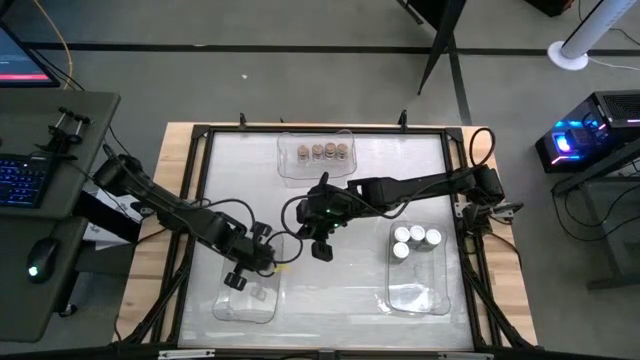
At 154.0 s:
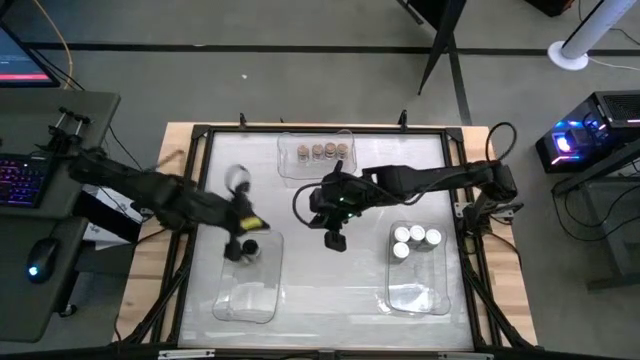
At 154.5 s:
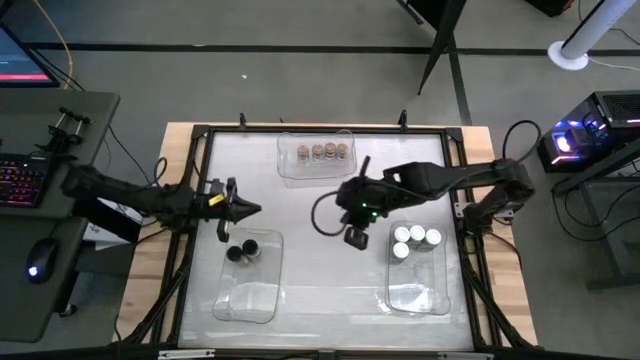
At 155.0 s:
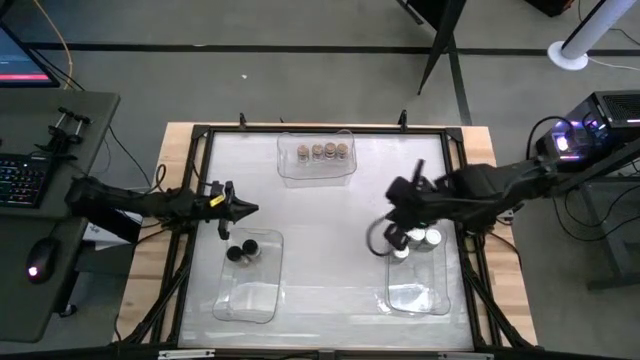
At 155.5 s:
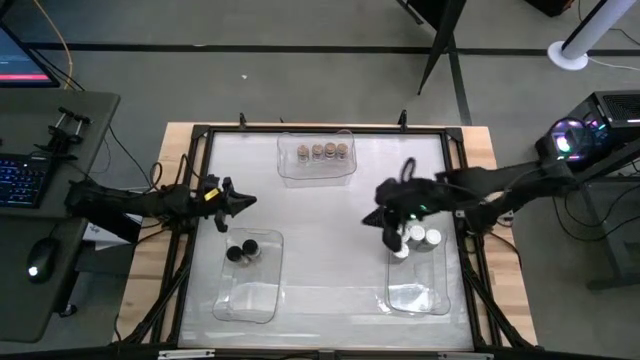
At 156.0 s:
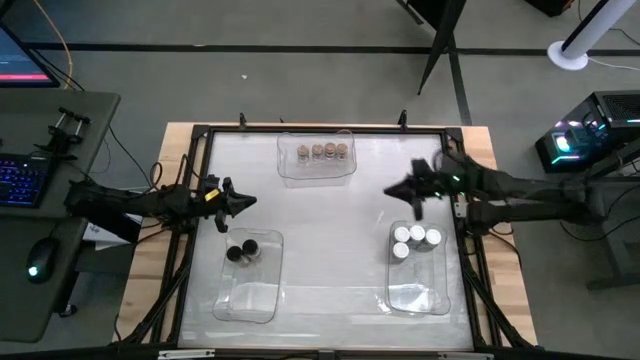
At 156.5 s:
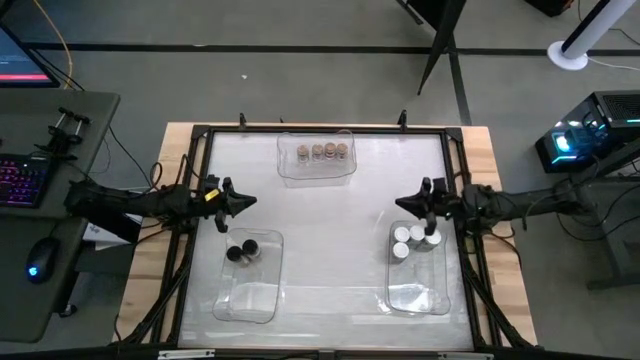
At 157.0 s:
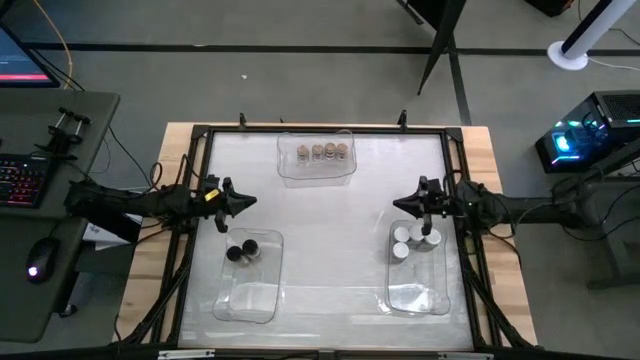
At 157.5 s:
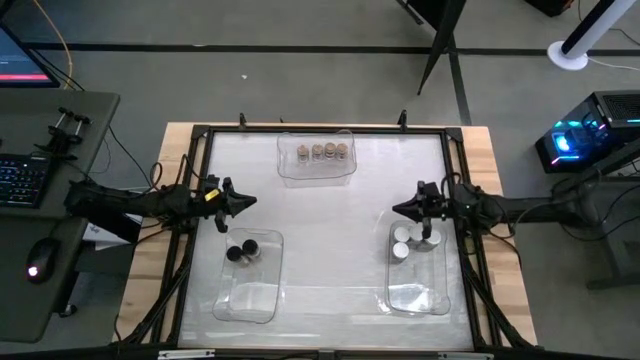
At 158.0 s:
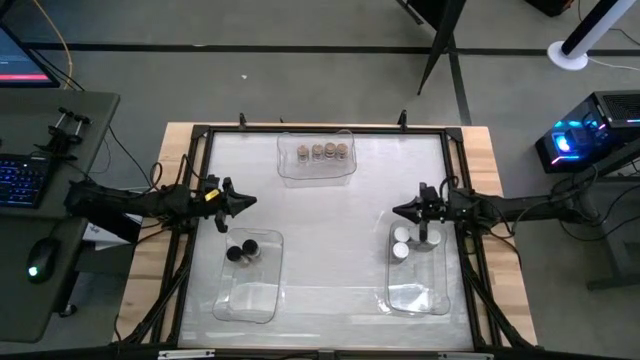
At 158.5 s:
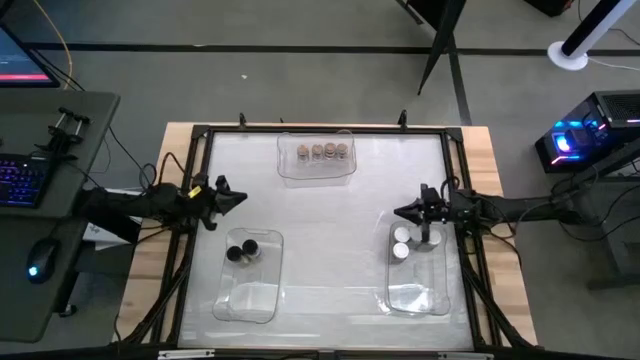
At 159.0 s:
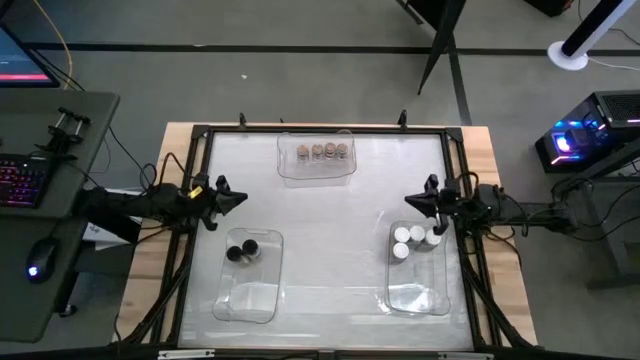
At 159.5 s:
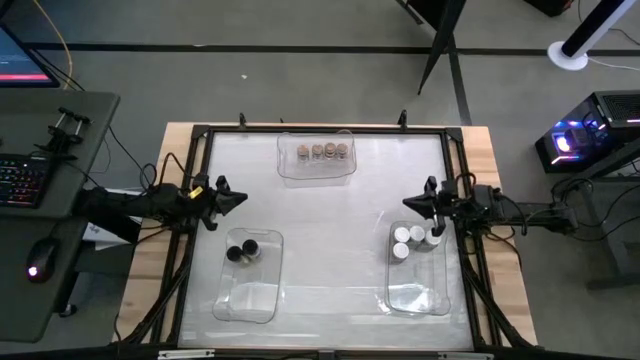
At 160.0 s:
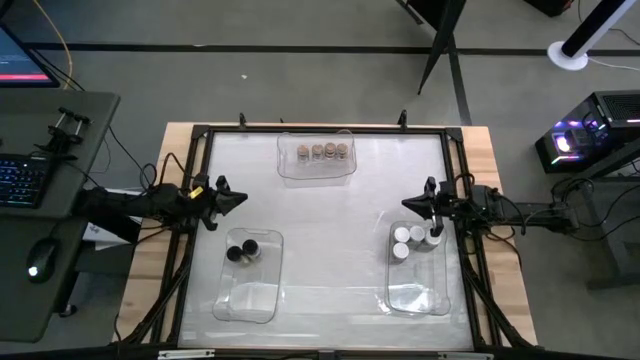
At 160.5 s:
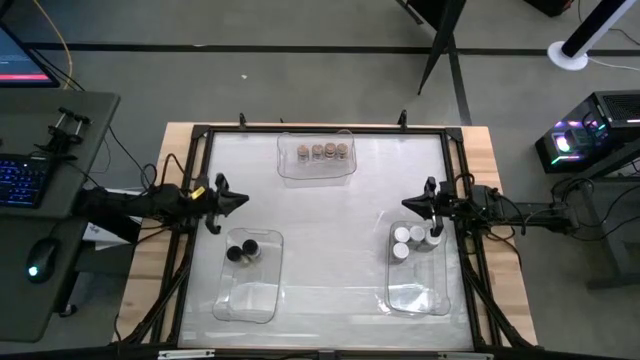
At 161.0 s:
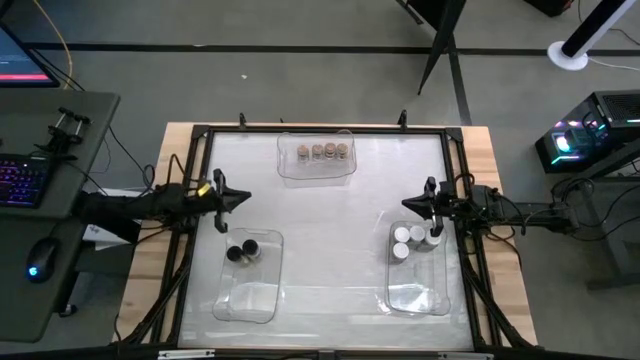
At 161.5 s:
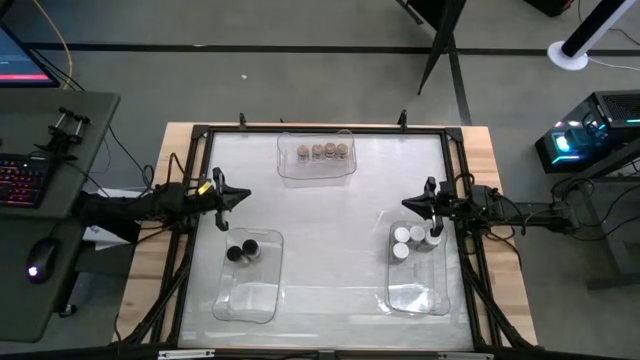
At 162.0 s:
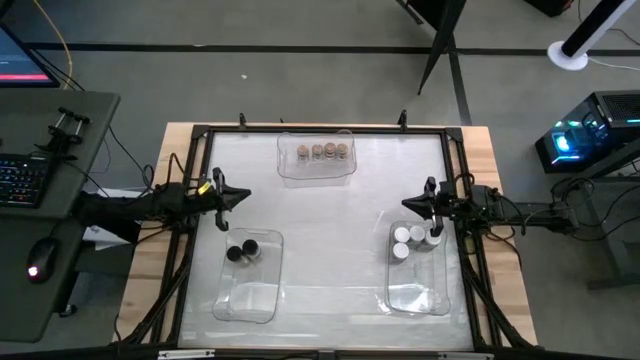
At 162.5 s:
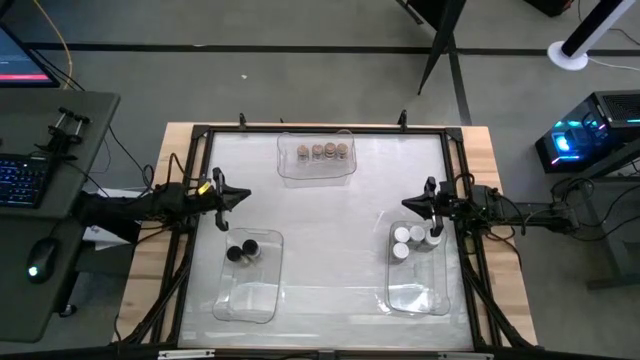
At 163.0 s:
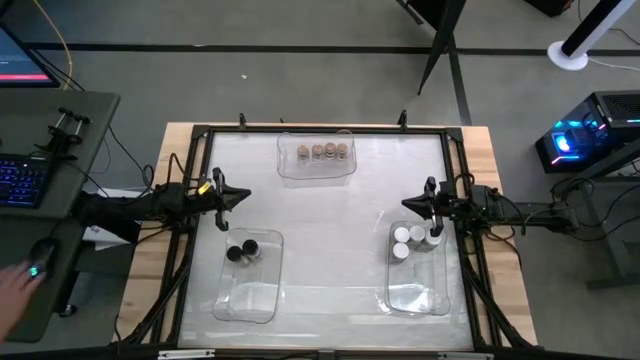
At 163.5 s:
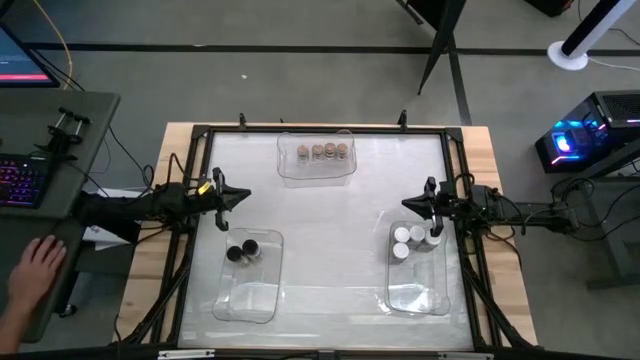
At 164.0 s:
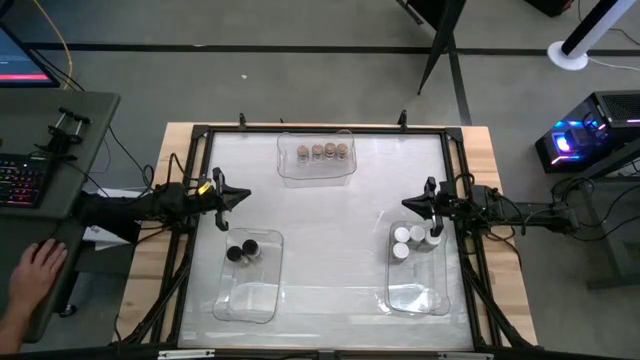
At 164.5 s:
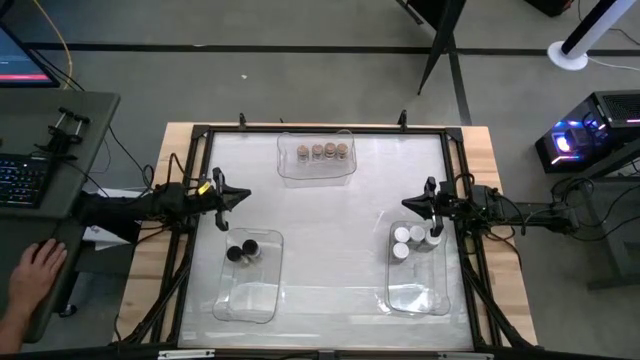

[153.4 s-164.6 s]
Task: Sort spices by type
Return to Home Position

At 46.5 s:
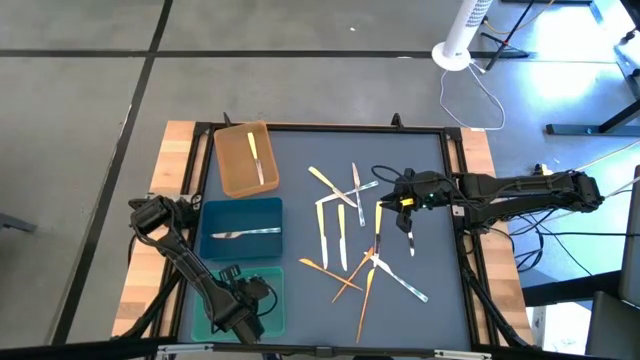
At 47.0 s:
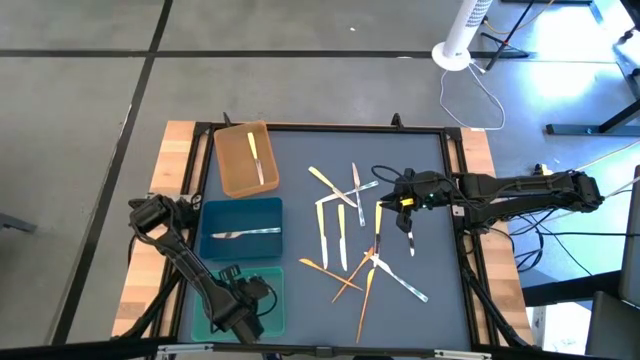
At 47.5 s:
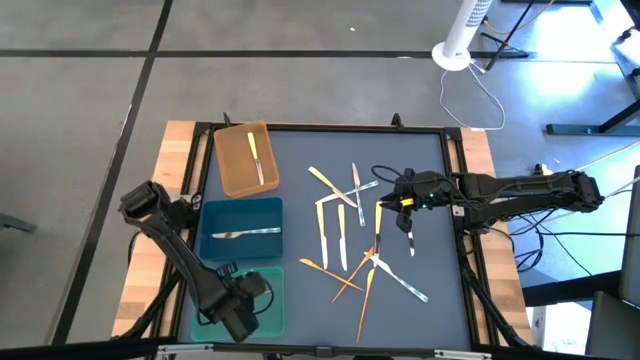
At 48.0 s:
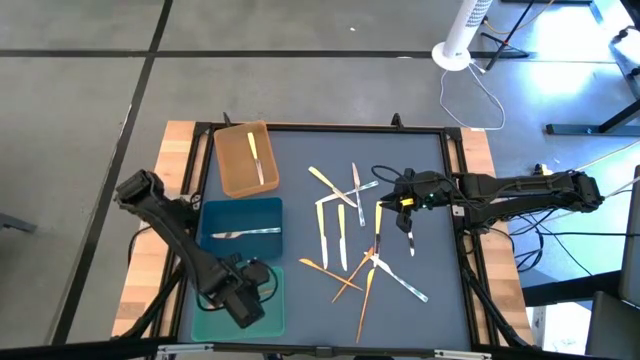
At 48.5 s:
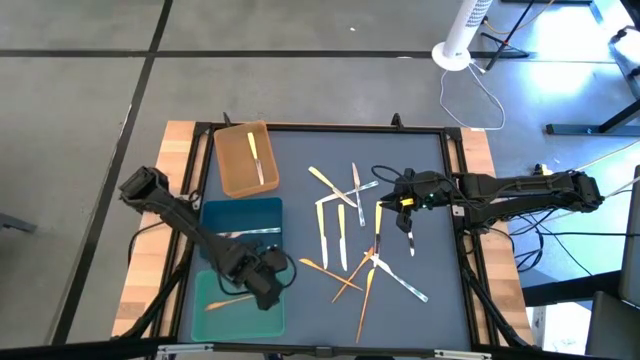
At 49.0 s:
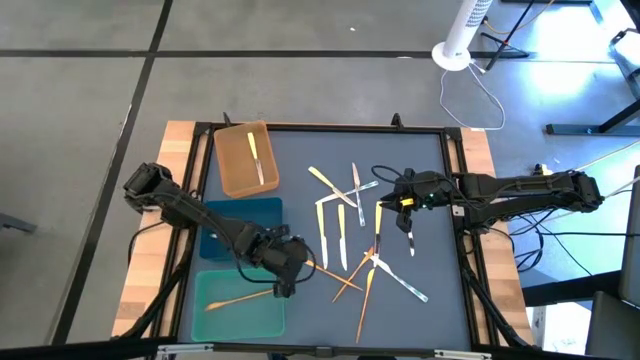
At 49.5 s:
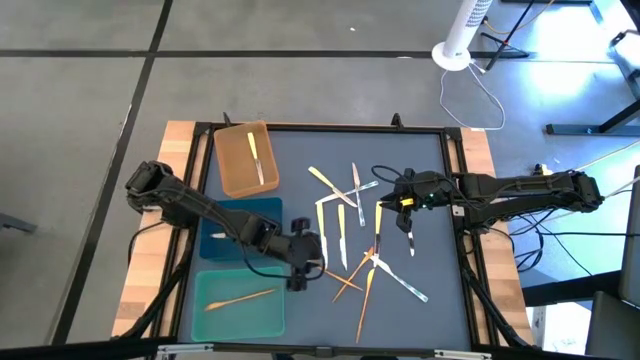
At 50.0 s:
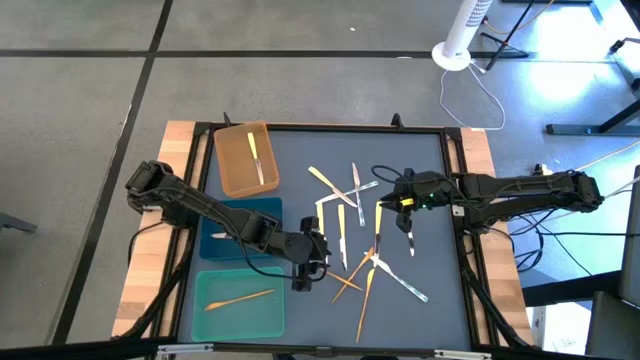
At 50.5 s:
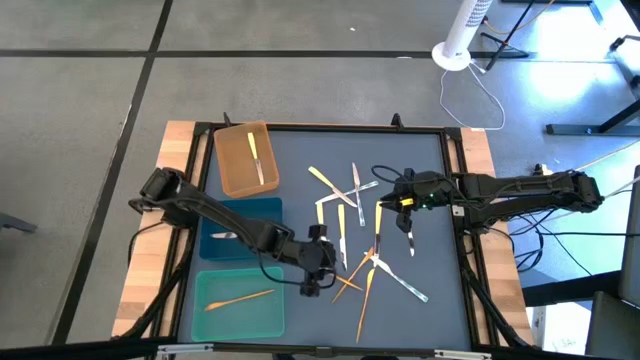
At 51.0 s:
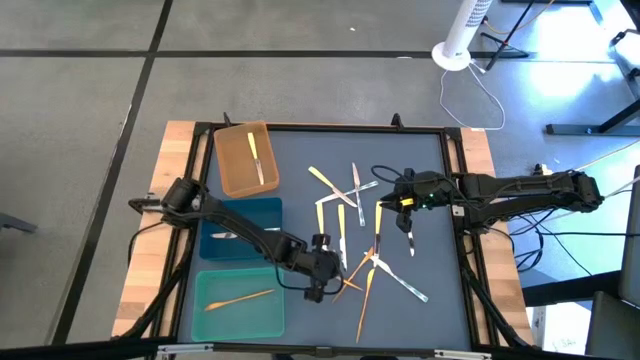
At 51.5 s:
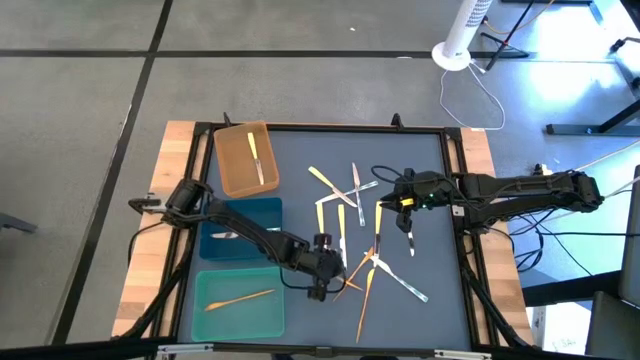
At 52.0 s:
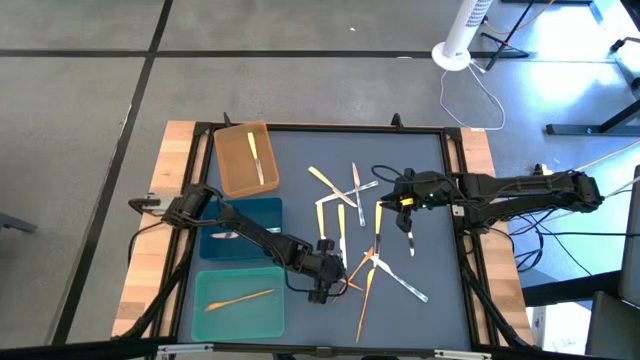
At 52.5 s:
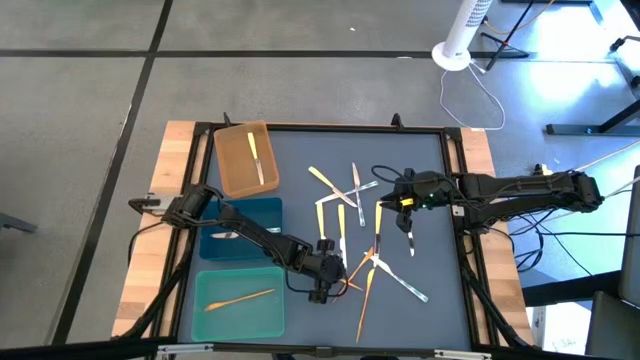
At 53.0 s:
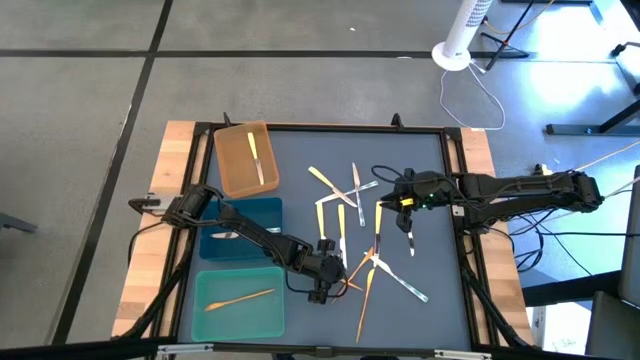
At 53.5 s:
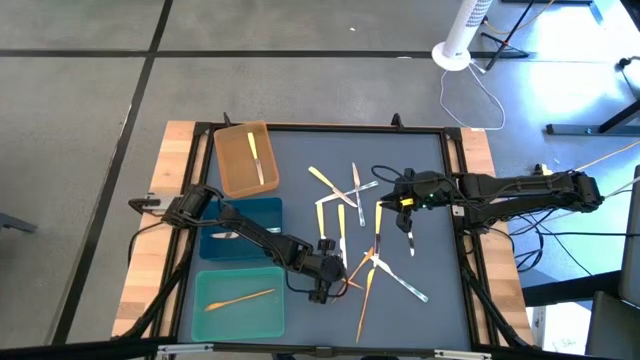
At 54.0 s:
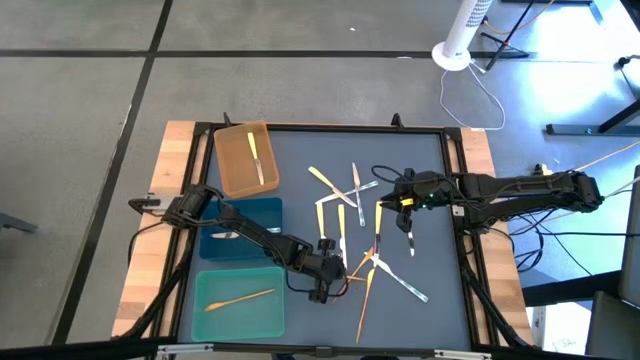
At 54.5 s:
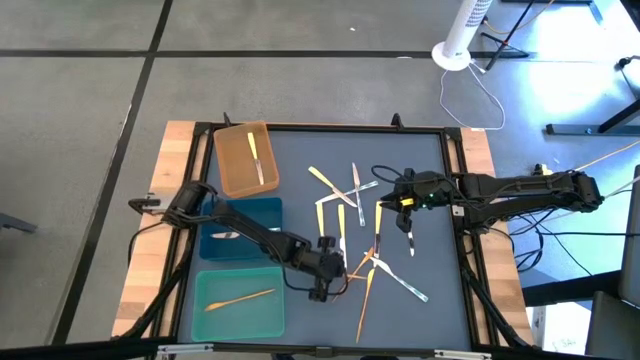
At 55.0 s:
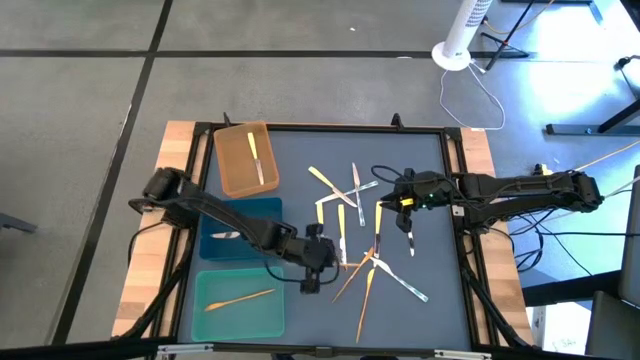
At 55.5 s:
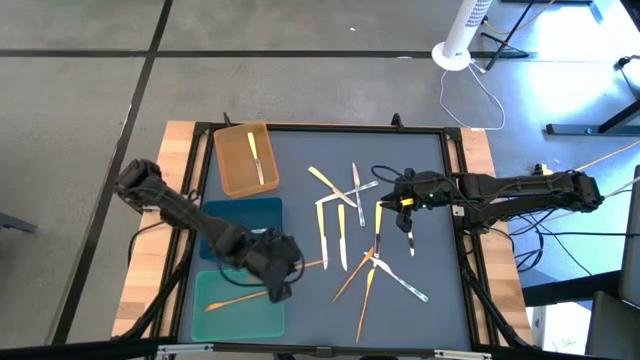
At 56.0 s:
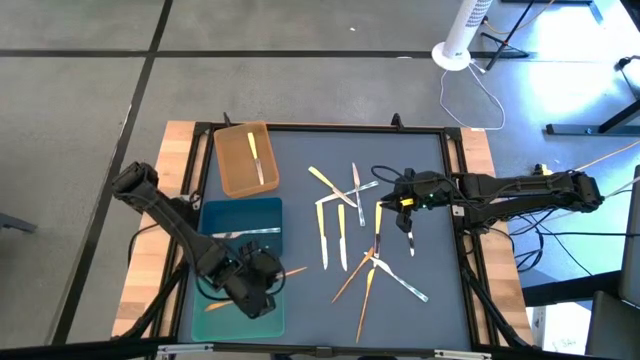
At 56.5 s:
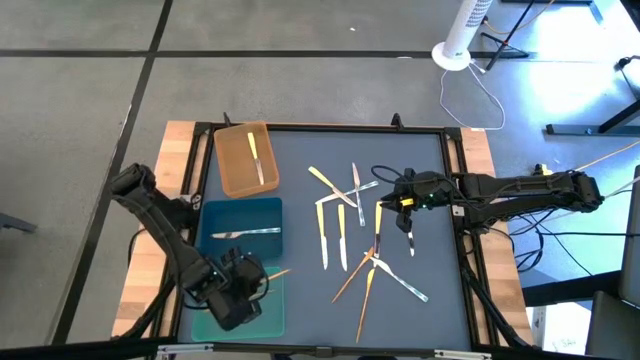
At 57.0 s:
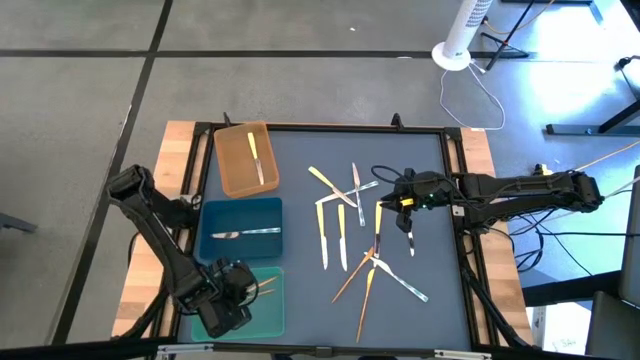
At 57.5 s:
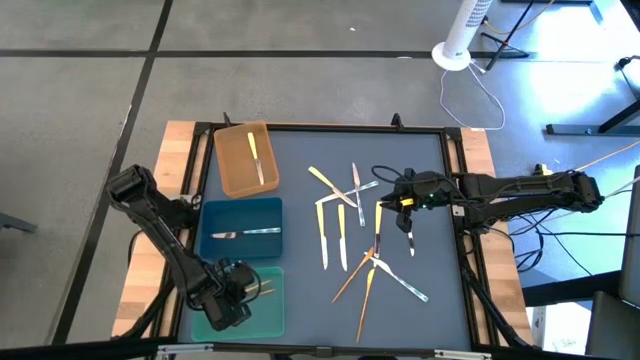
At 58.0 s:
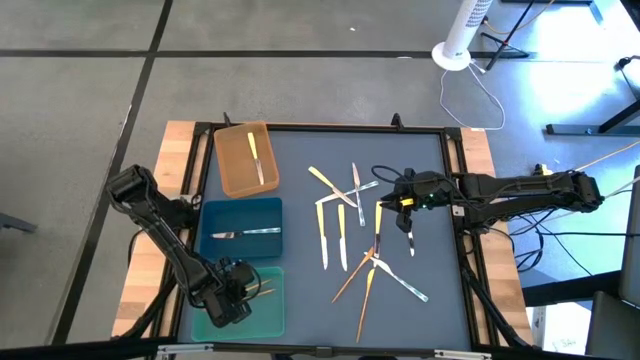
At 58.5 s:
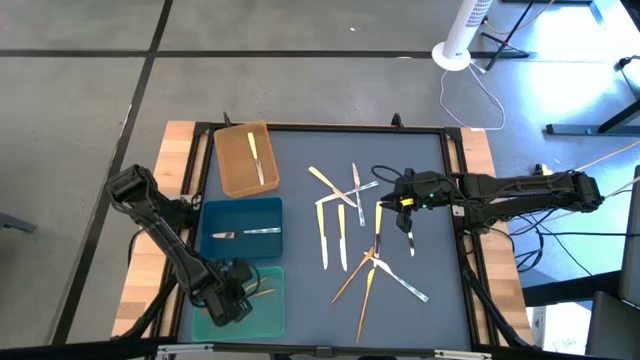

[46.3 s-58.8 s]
Task: Sort silverware by color (type)
Put the gold knife into the green bin
